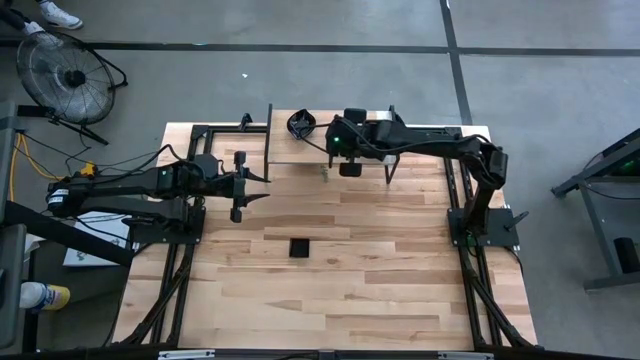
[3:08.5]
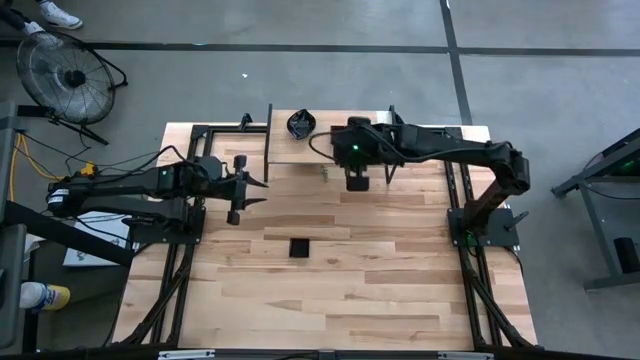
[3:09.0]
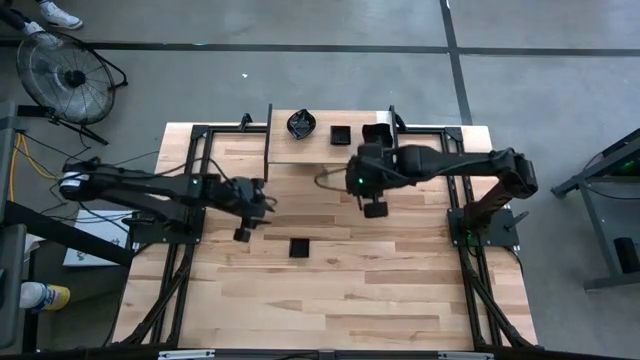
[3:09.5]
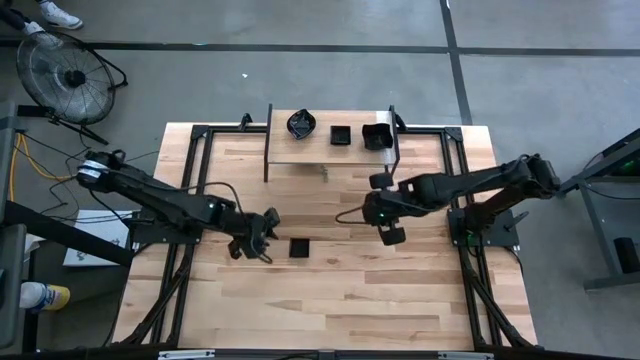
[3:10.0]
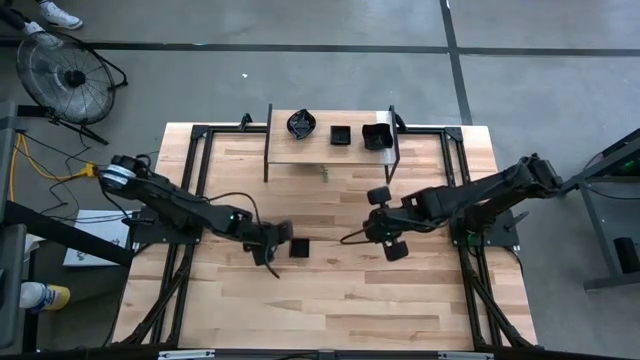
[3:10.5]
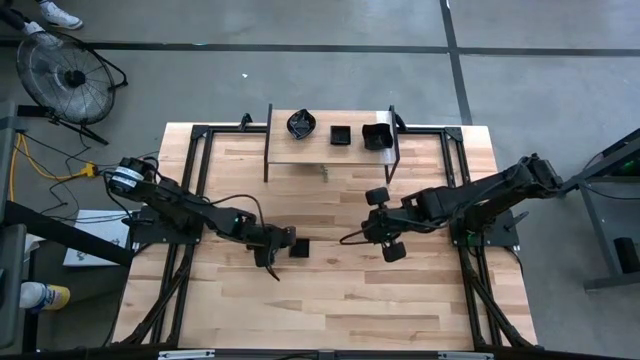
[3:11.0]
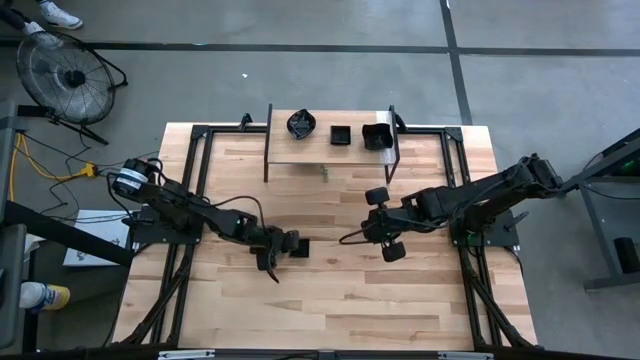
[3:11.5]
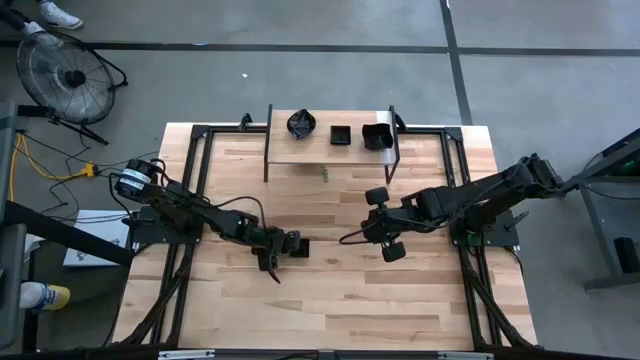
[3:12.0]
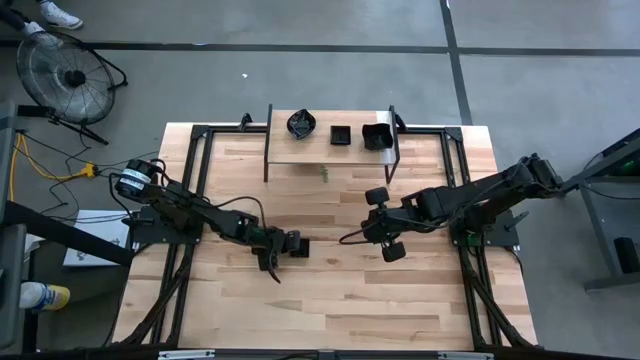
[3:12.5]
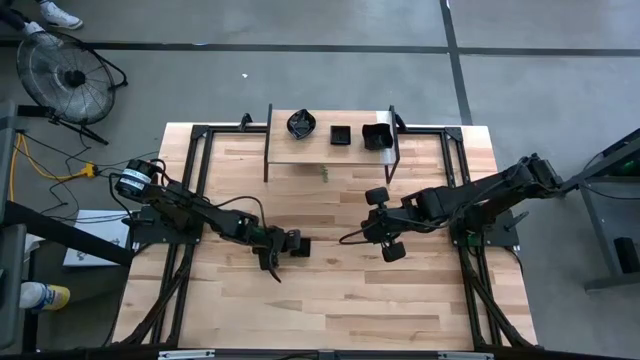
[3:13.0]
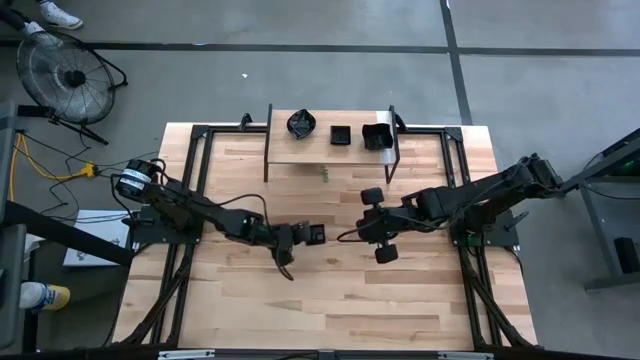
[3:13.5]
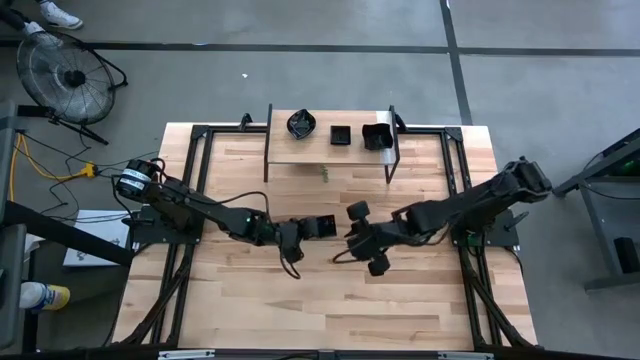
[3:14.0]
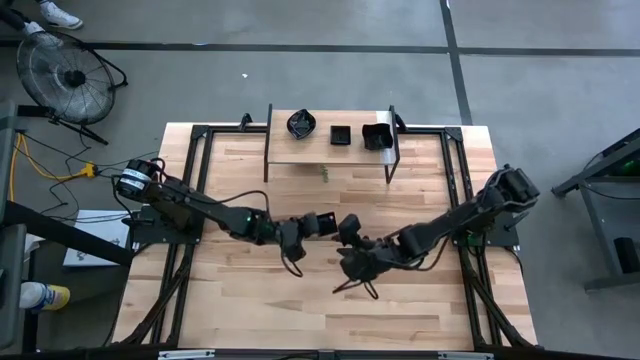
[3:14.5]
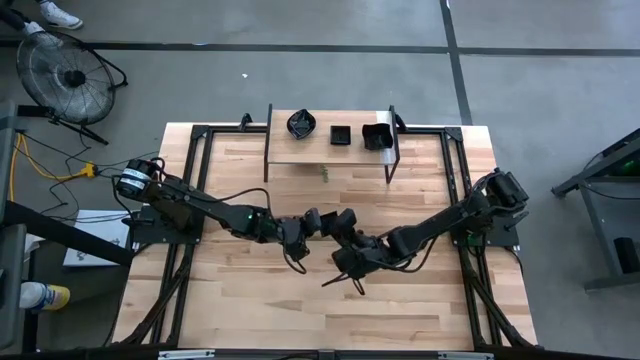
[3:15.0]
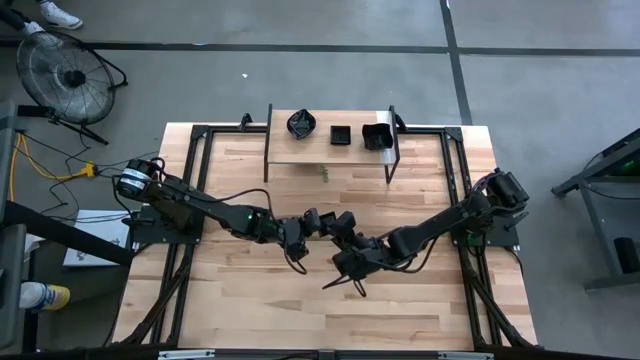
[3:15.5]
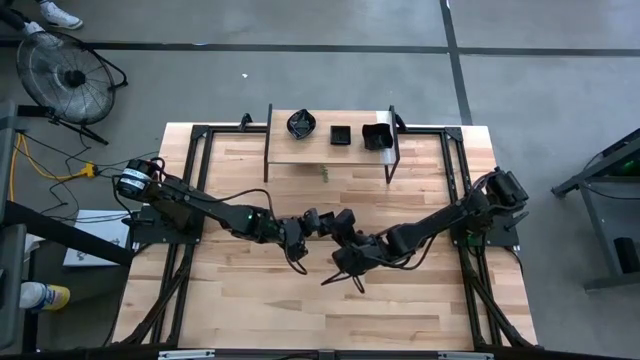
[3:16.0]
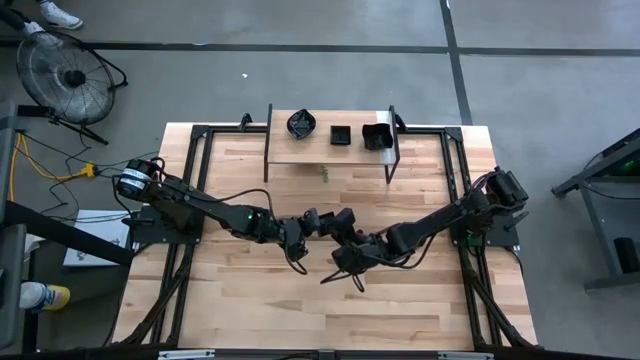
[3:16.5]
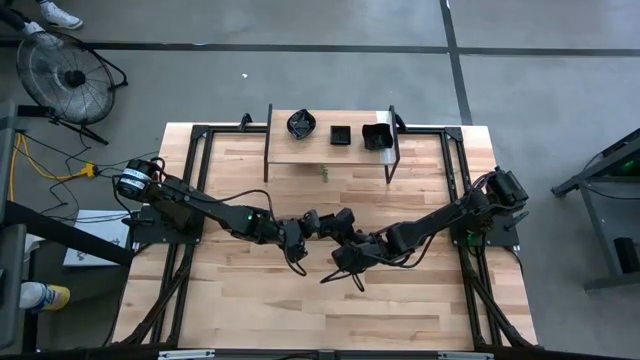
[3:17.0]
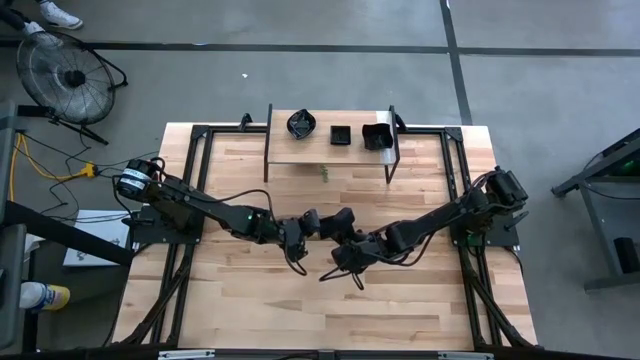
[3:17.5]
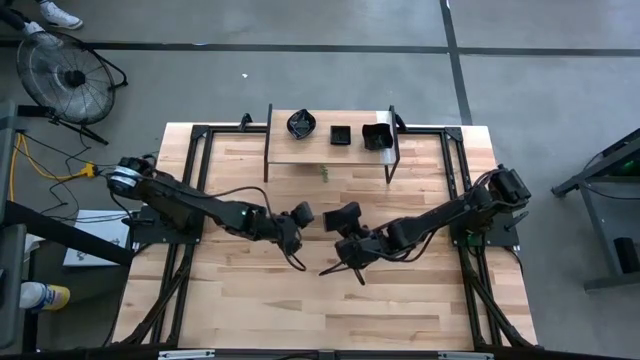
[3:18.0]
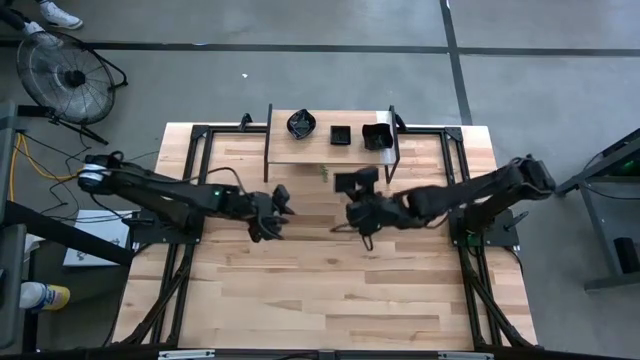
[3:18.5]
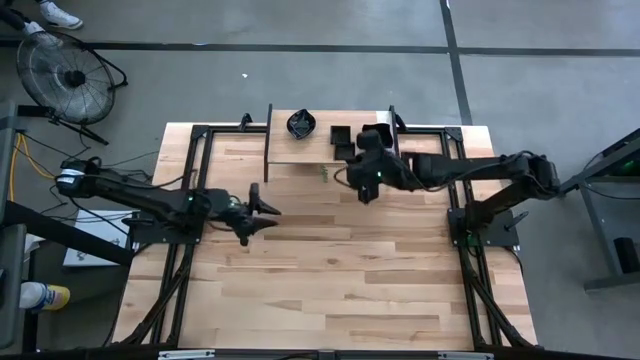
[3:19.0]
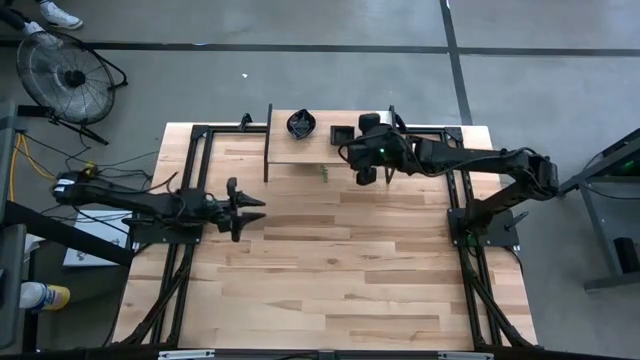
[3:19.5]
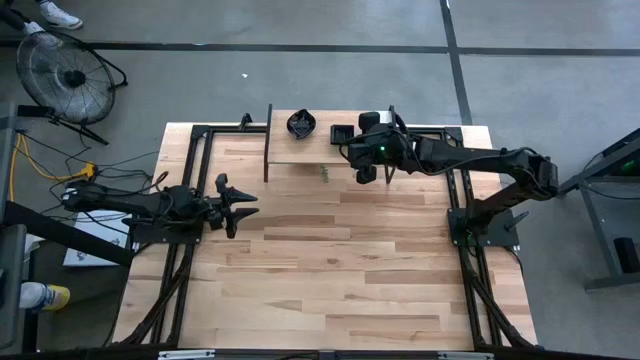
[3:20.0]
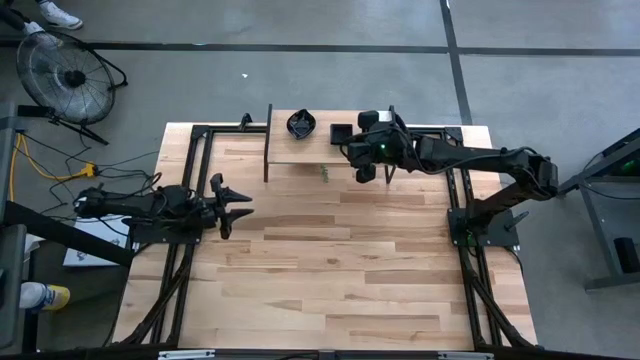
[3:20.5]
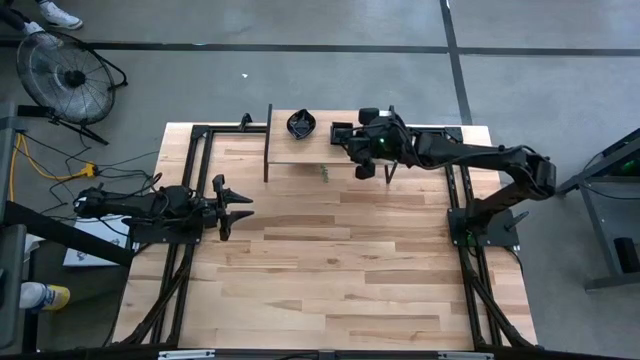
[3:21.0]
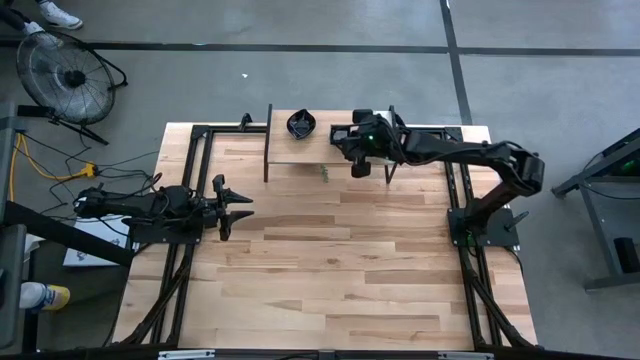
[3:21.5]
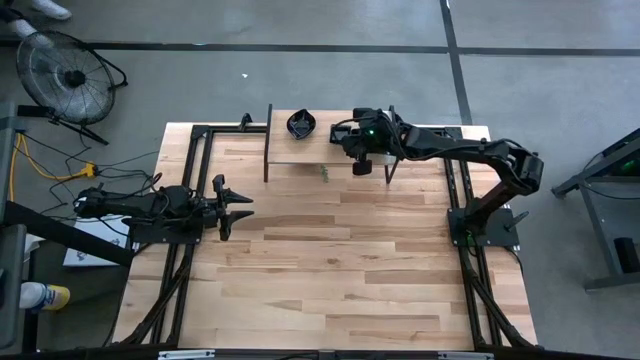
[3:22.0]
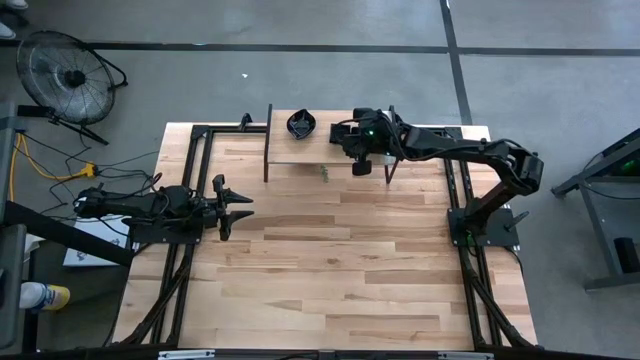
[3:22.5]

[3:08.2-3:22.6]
Task: Pick & Place Mini shaped plates
Stack the square plate on top of the other square plate on the shelf

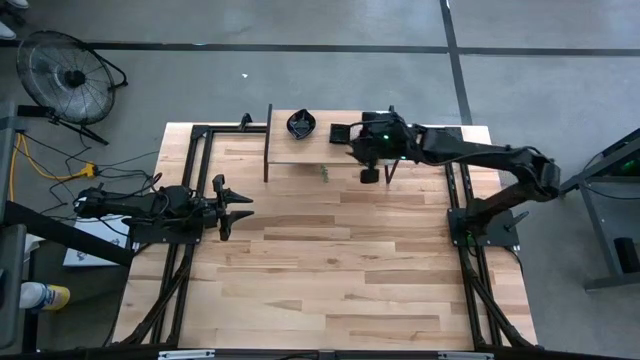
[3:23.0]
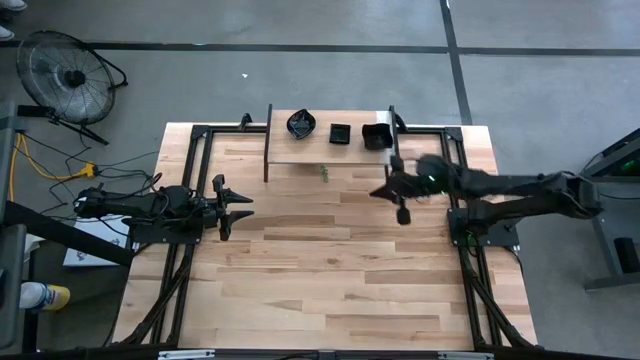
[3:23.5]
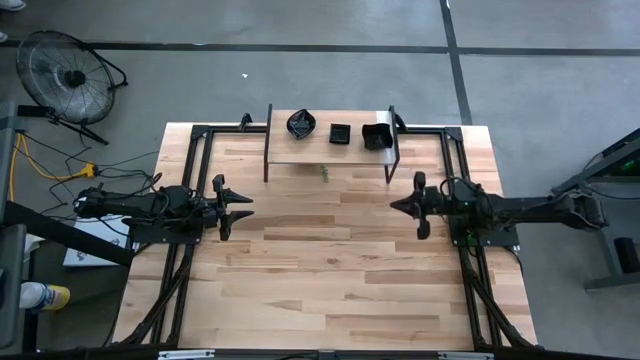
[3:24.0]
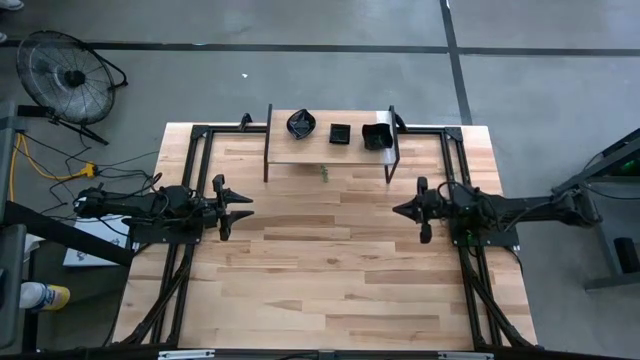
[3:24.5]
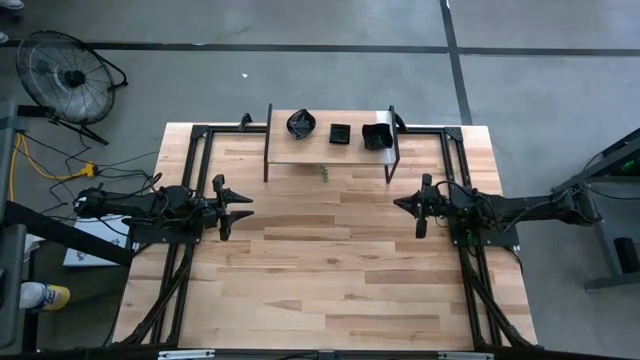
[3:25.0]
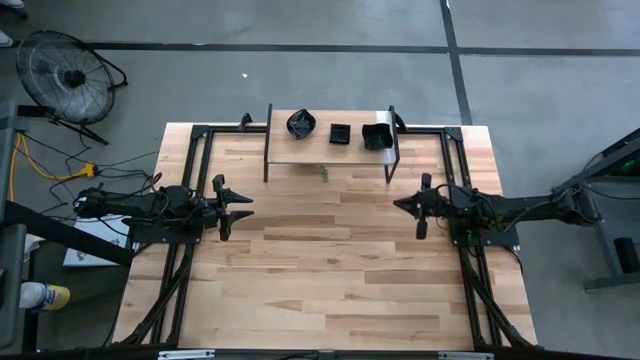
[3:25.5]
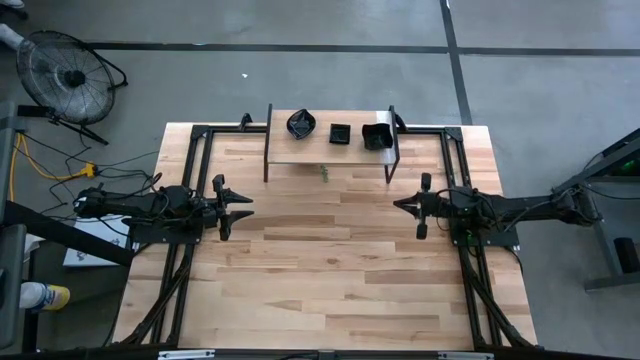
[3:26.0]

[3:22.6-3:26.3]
Return to Home Position

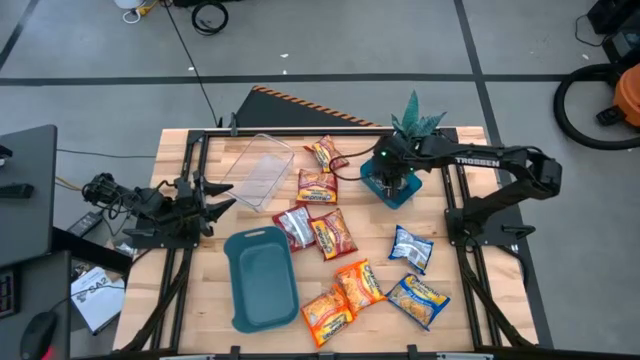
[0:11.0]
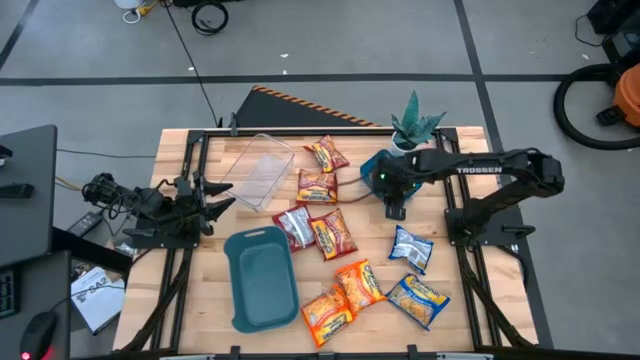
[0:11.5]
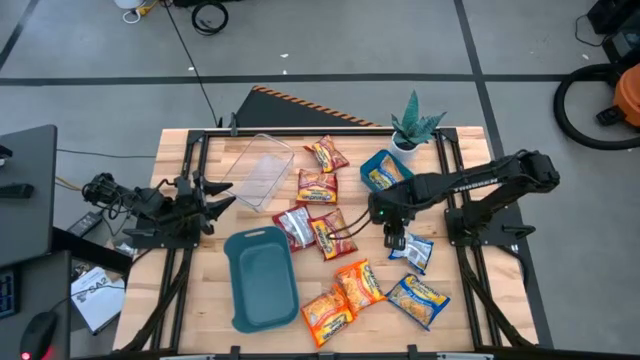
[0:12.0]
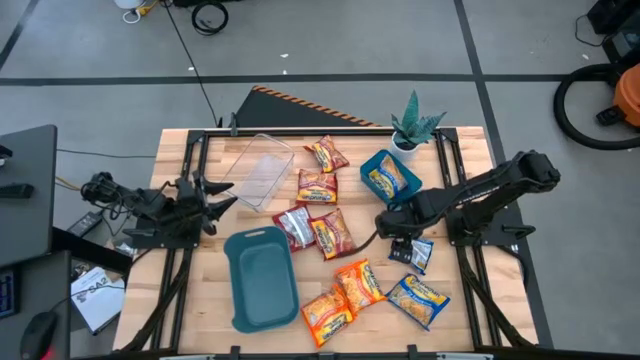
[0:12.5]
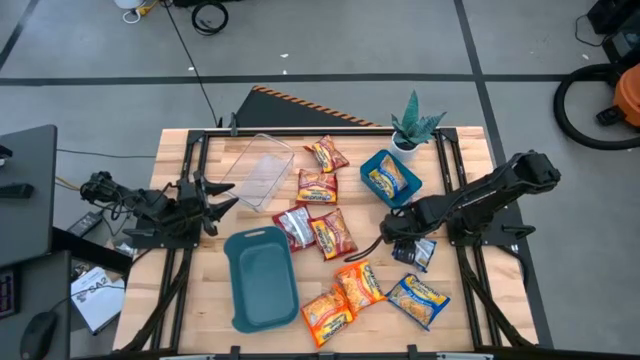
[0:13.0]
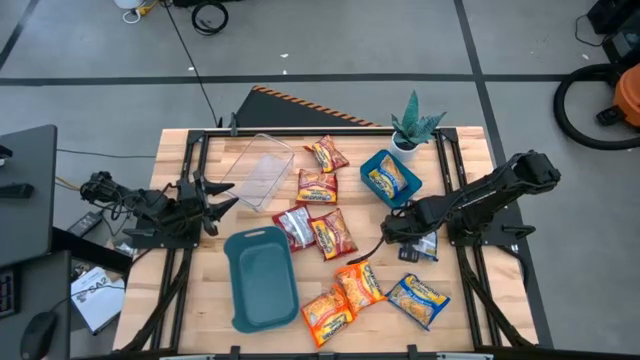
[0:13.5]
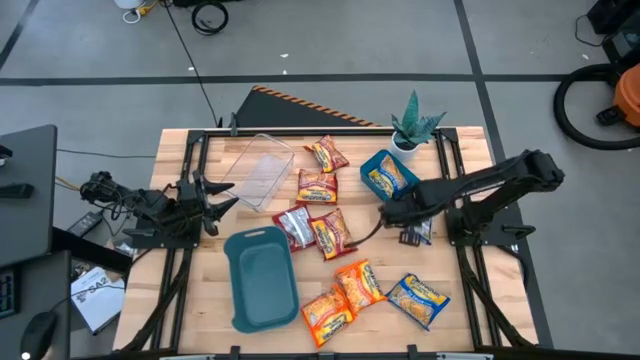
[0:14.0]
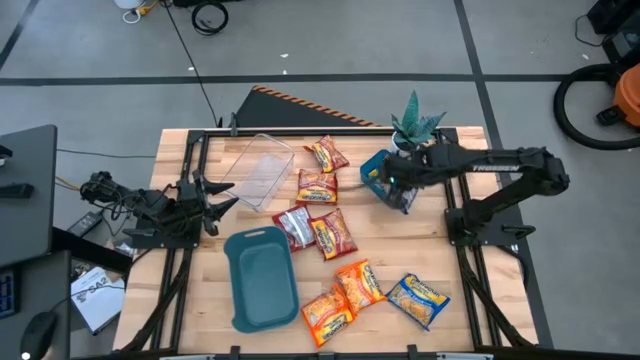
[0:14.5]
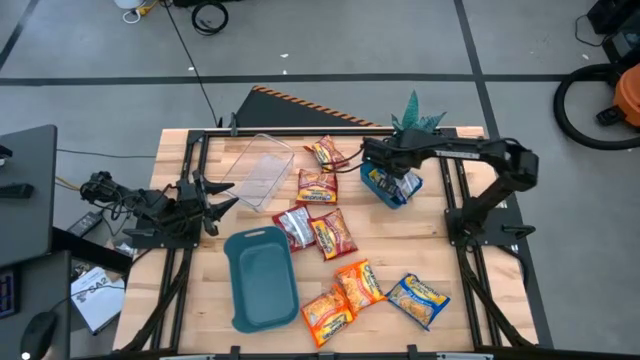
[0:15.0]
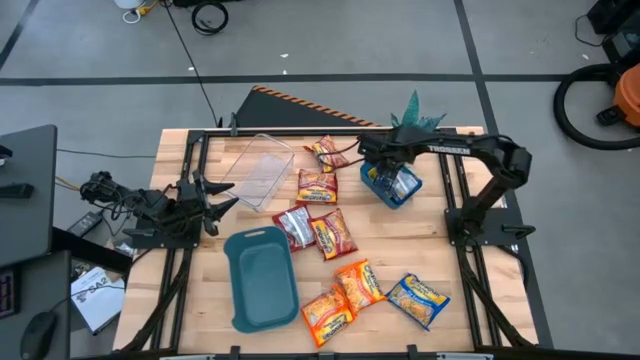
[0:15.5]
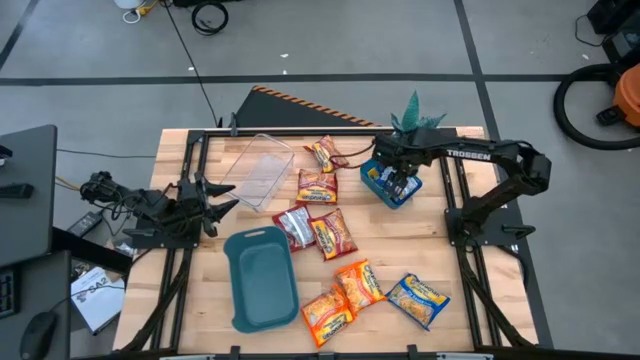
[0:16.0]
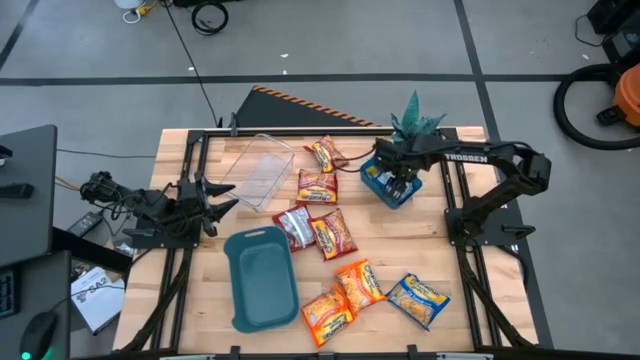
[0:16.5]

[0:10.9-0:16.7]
Task: Sort Maruchan noodles
Put the blue noodle pack into the blue bin
